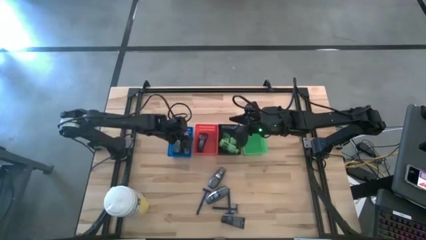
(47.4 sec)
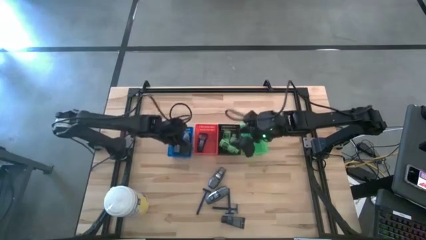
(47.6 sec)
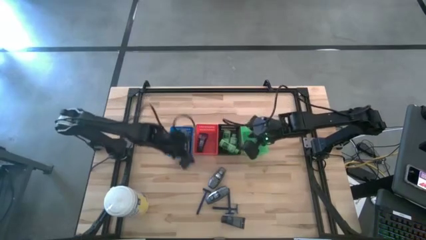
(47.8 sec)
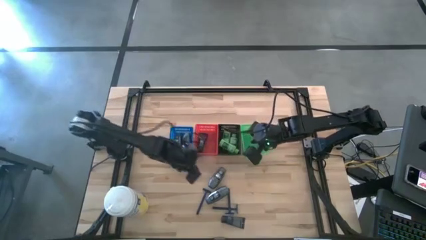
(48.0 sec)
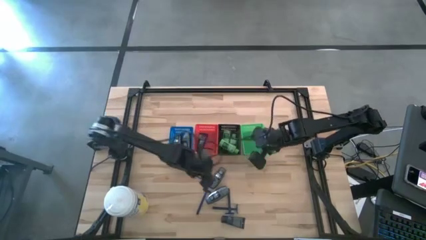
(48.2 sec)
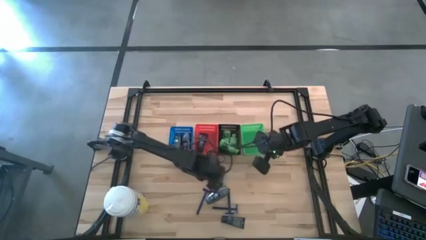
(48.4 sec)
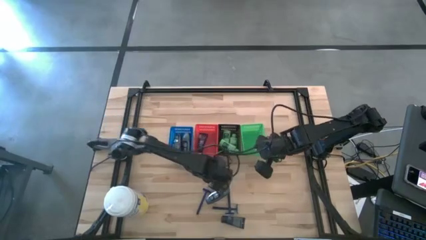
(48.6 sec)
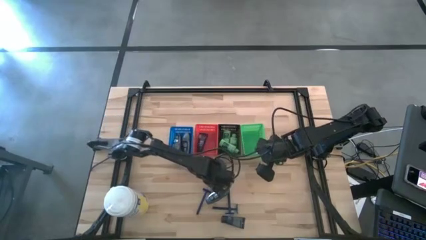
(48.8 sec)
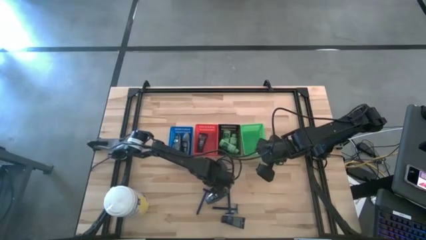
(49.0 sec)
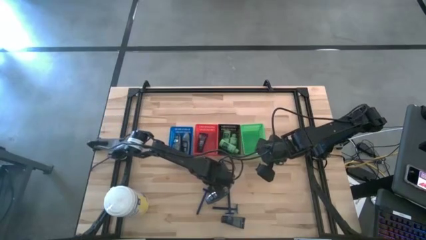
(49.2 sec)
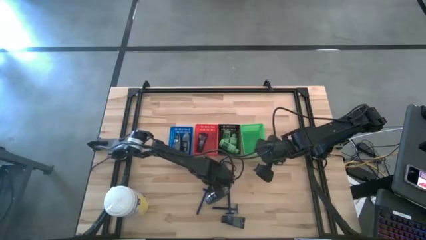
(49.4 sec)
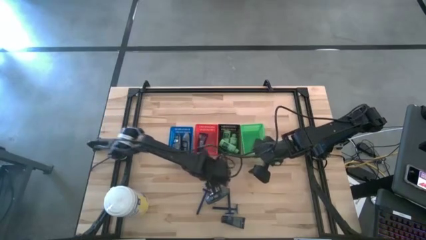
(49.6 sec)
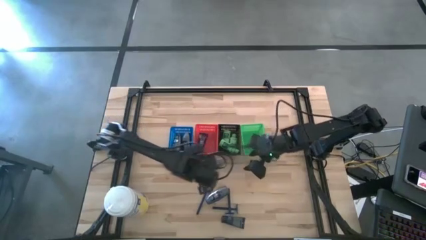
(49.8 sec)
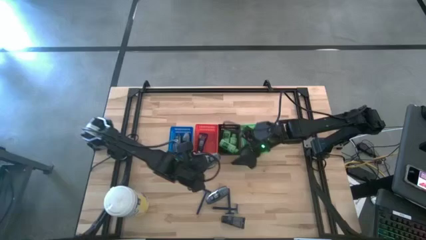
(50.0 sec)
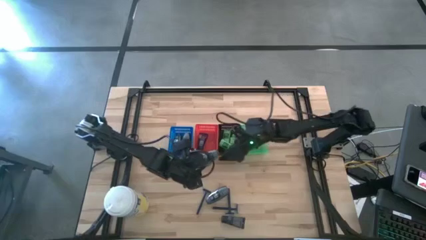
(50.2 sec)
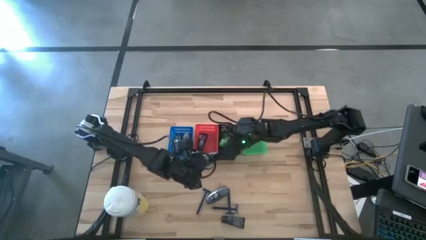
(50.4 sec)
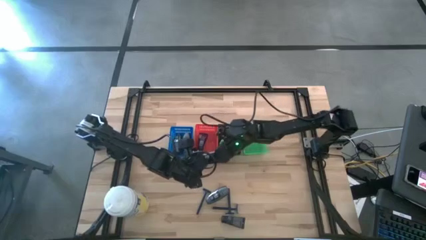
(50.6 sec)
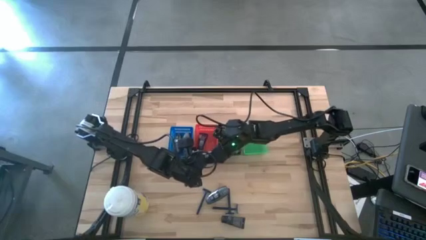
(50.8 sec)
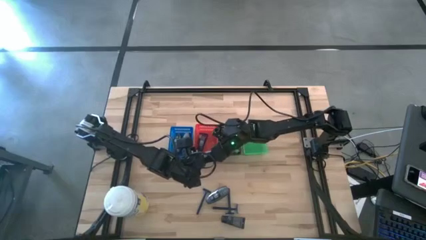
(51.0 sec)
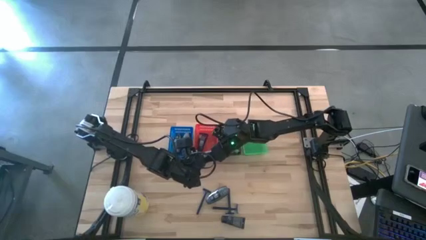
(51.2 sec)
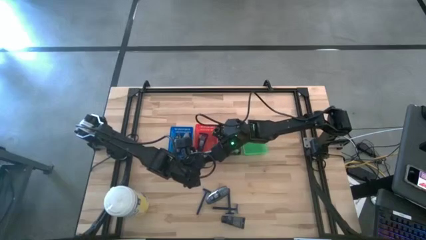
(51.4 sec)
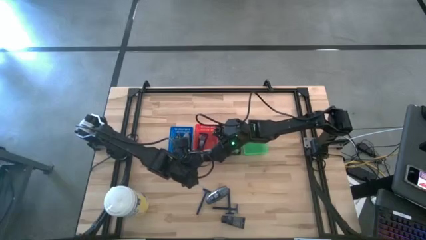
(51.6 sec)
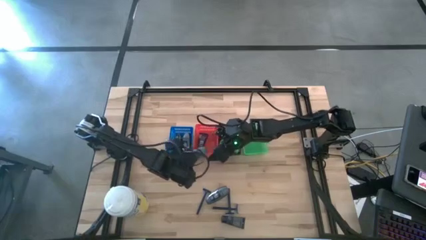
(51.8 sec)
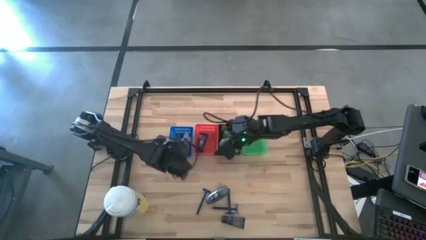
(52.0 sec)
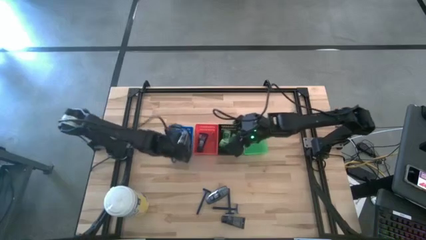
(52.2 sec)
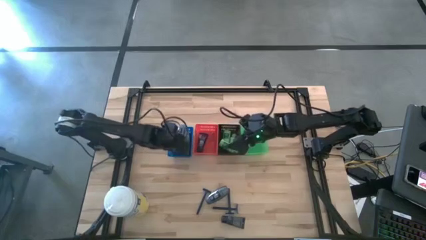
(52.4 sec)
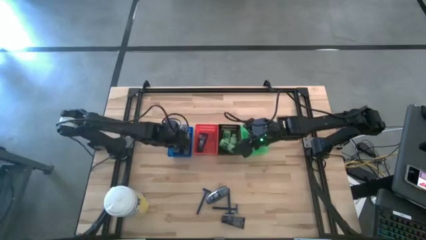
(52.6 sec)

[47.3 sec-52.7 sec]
Task: Pick & Place Travel size toiletries
Put the deodorant into the blue bin

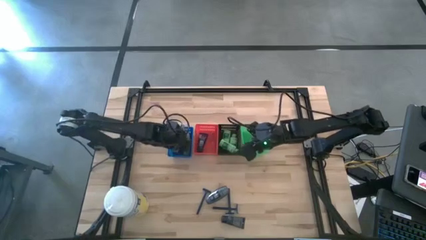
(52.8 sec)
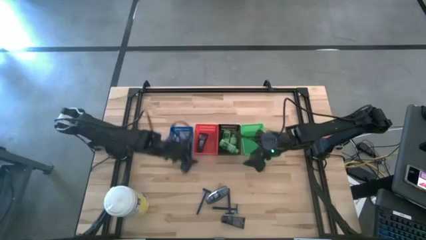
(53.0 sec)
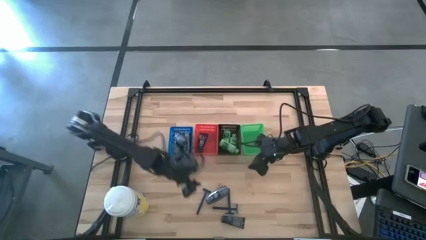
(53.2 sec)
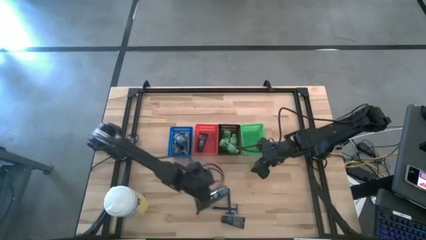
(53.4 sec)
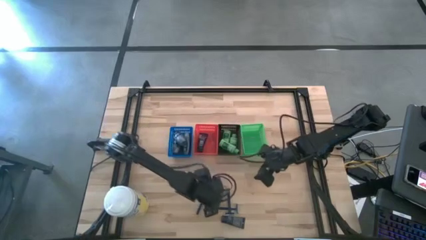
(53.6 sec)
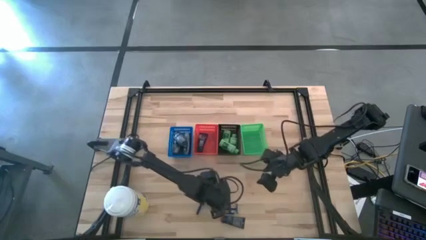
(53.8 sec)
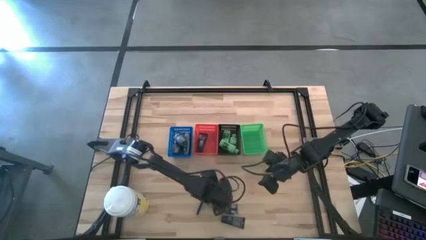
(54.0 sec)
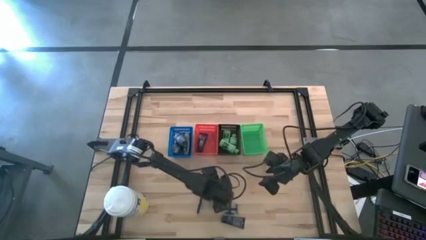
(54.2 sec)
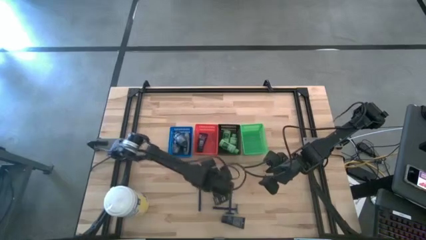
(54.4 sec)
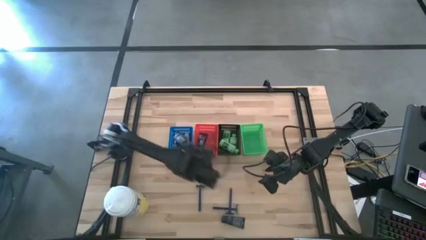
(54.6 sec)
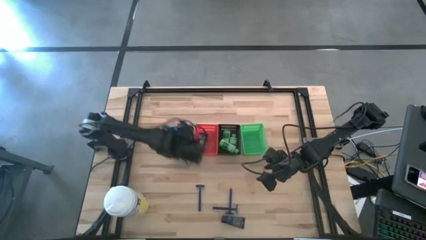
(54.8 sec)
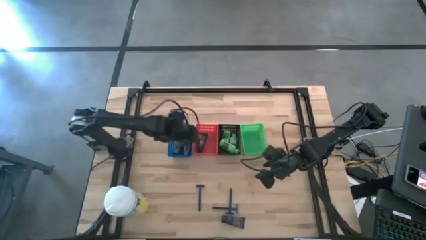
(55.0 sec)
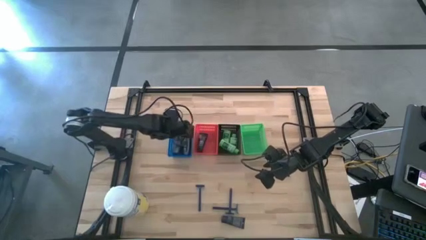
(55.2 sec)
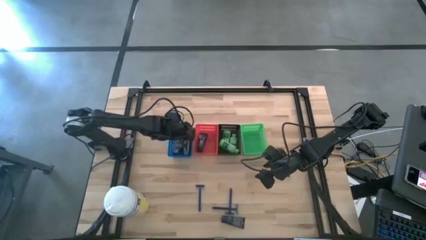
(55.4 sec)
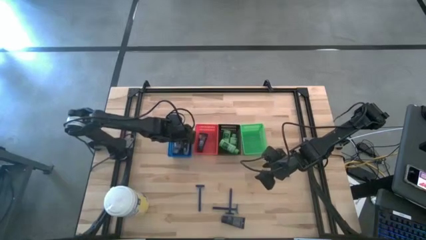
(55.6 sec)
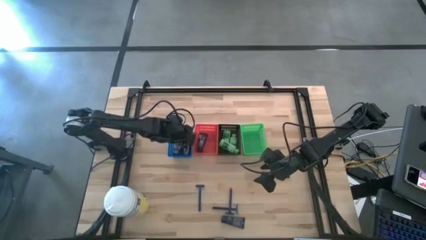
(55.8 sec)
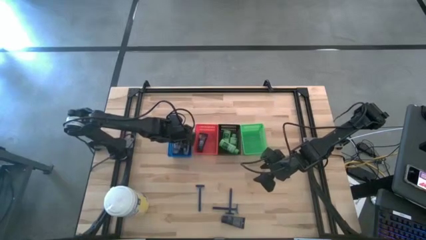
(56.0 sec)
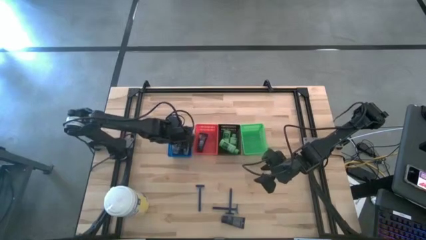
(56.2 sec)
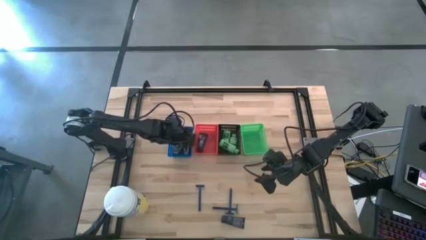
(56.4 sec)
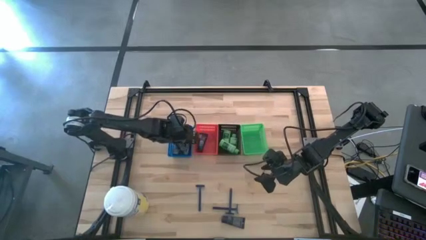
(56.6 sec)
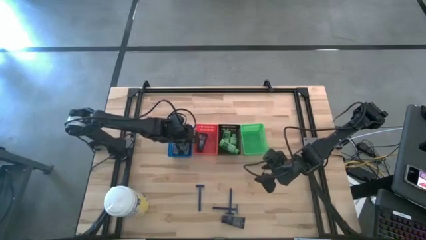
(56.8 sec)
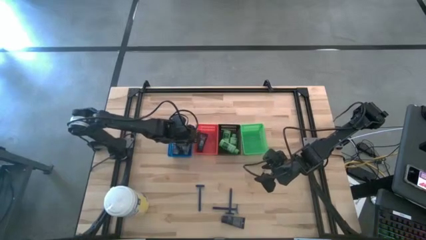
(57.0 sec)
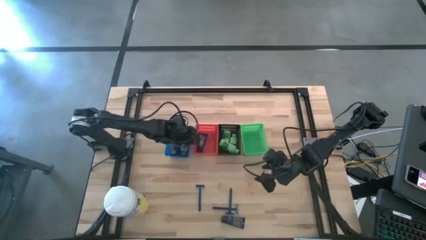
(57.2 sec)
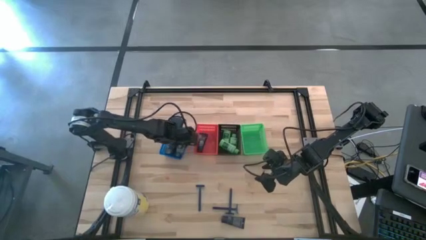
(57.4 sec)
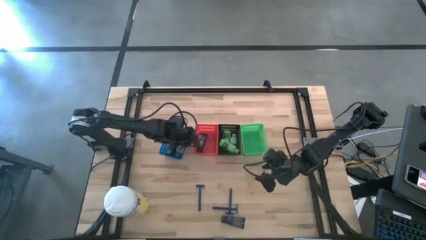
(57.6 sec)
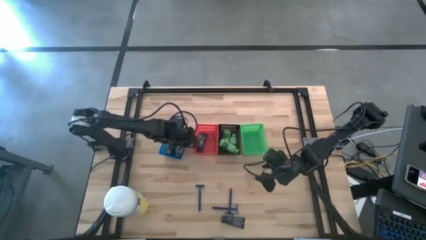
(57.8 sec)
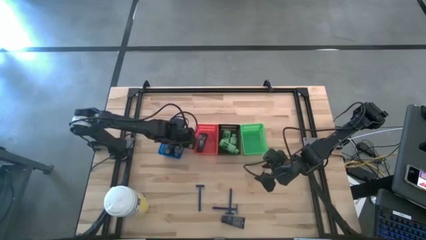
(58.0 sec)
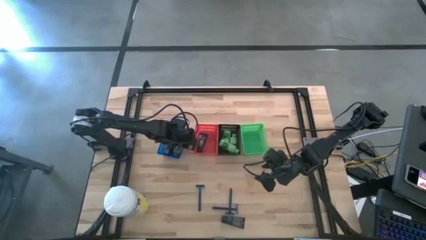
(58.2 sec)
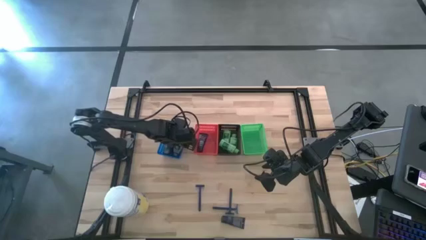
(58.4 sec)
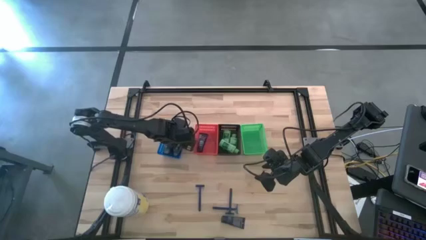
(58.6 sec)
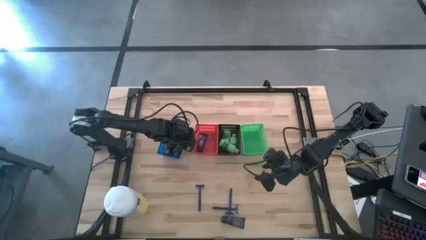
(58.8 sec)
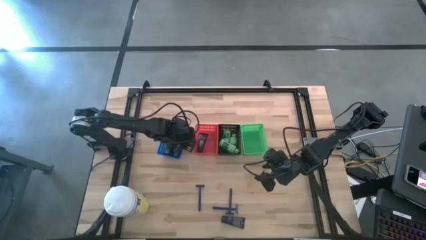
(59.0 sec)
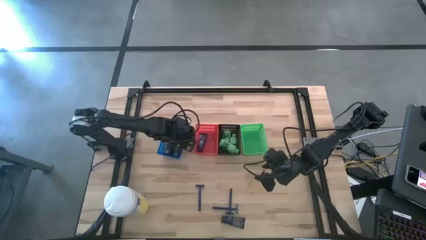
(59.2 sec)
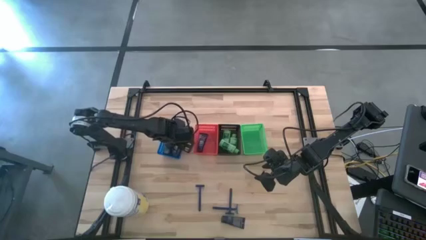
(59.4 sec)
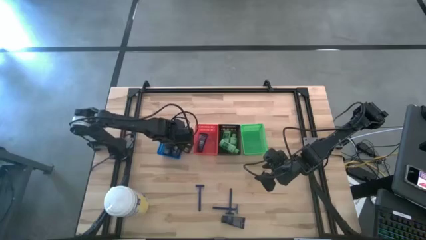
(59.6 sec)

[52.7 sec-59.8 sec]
Put the deodorant into the blue bin

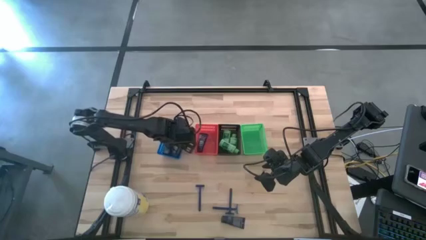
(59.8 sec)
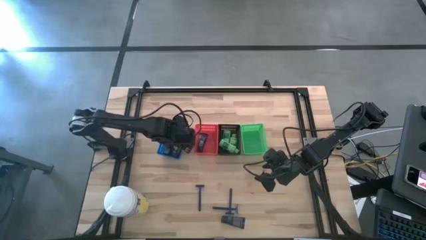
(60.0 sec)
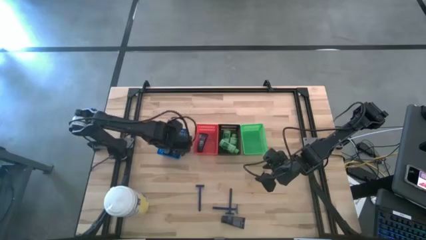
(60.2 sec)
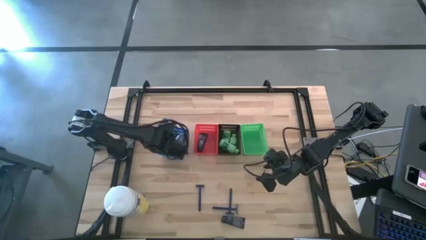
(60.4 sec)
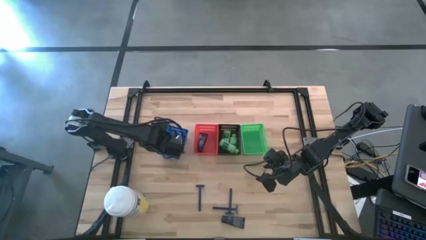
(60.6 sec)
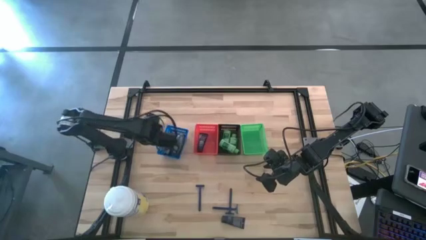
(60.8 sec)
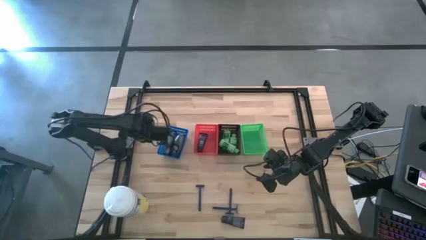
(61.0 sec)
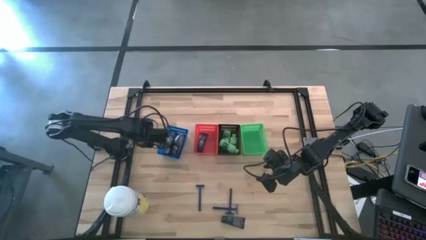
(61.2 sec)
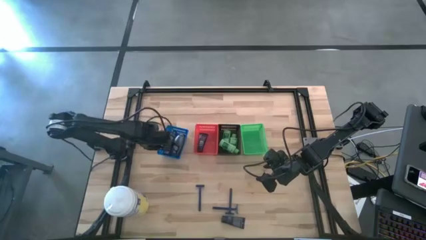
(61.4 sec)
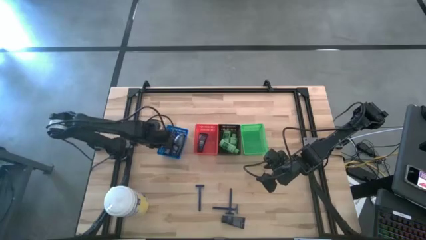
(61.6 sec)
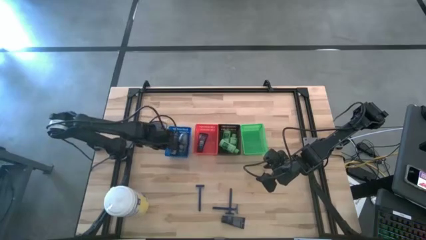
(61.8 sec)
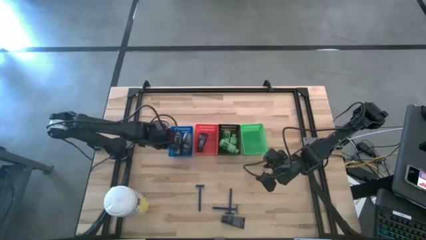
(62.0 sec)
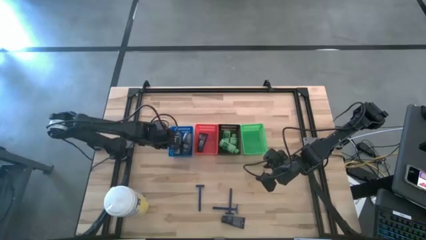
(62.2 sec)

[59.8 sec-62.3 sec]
Adjust the blue bin
